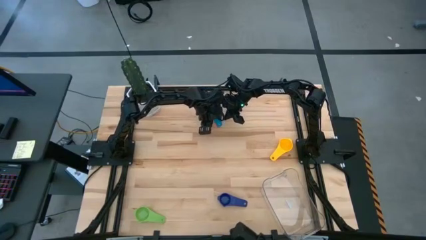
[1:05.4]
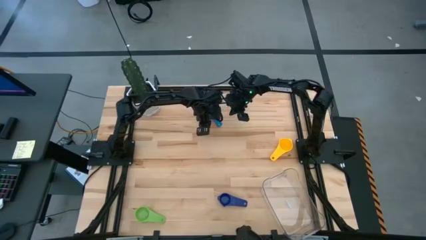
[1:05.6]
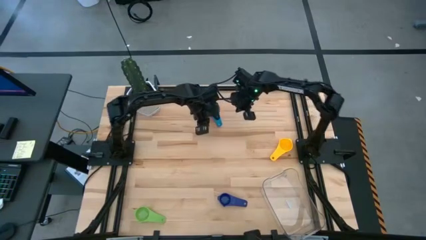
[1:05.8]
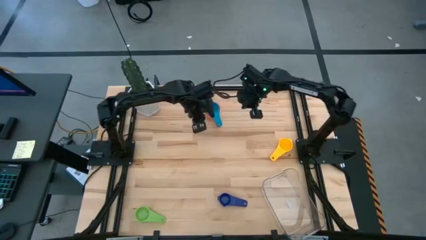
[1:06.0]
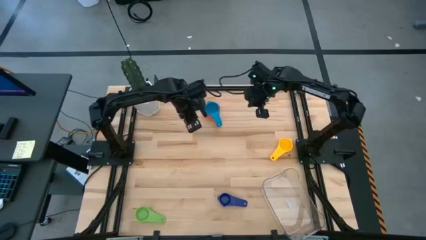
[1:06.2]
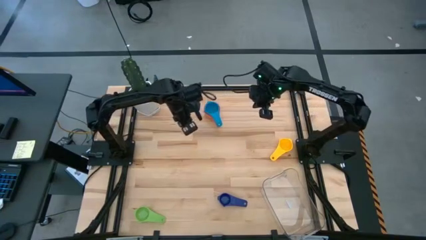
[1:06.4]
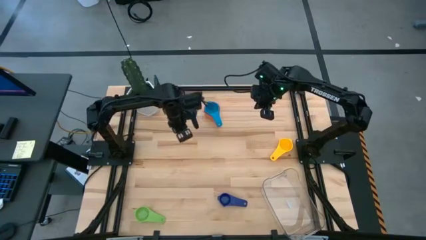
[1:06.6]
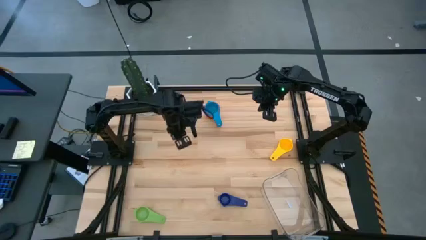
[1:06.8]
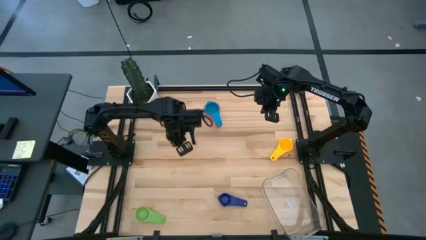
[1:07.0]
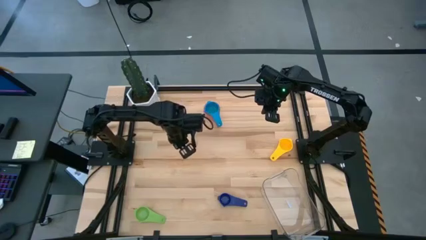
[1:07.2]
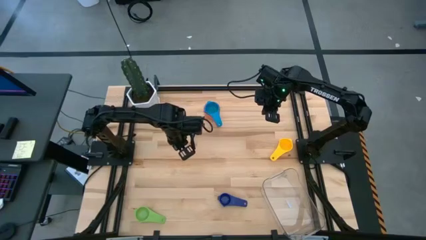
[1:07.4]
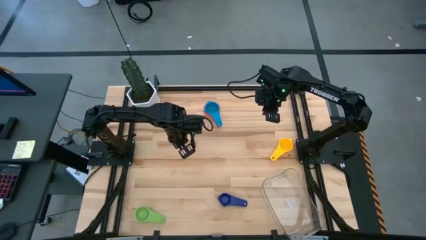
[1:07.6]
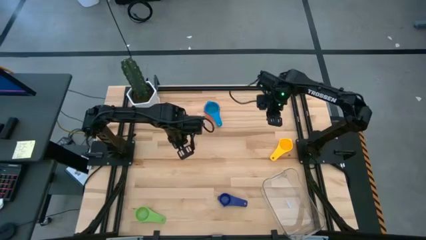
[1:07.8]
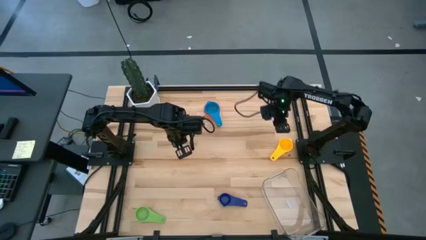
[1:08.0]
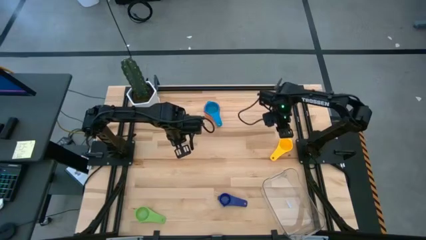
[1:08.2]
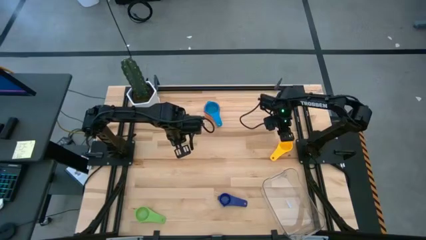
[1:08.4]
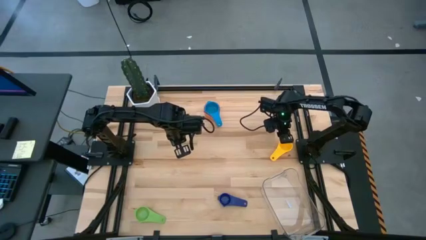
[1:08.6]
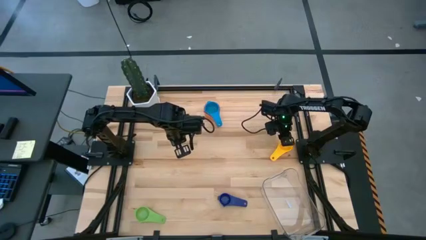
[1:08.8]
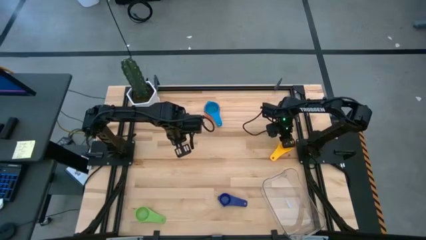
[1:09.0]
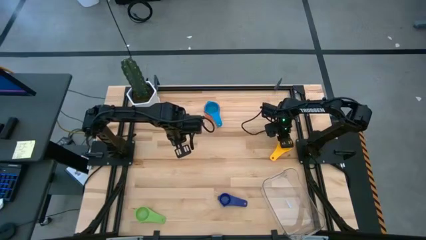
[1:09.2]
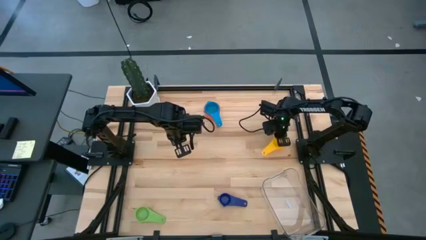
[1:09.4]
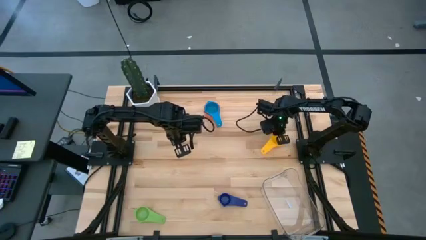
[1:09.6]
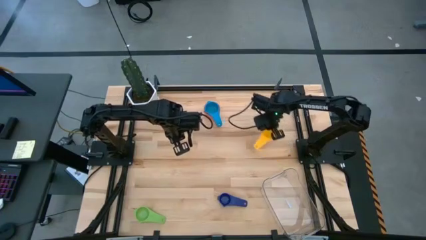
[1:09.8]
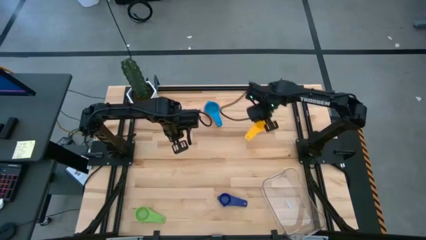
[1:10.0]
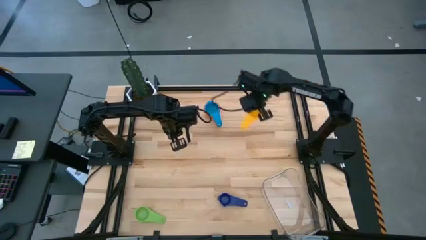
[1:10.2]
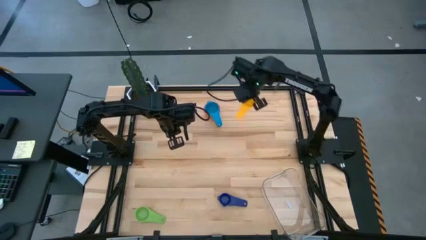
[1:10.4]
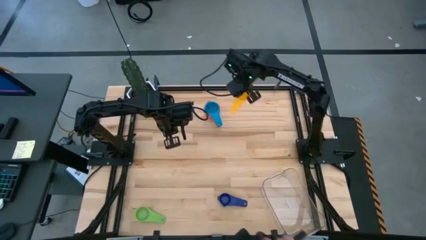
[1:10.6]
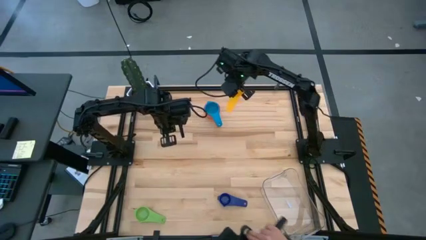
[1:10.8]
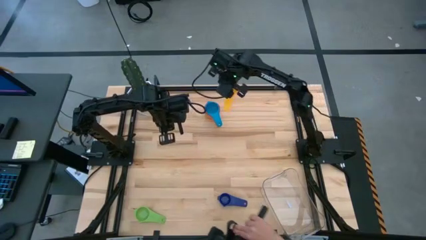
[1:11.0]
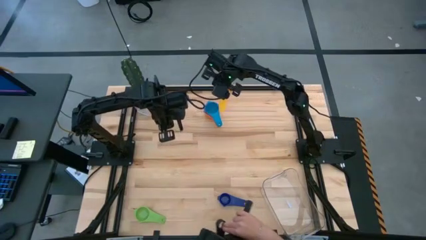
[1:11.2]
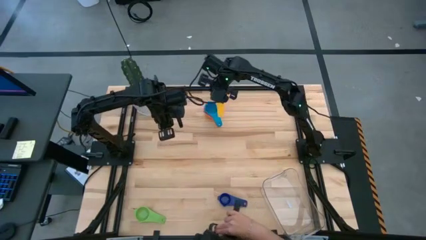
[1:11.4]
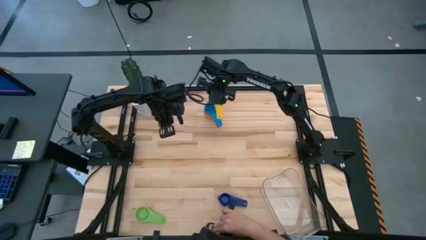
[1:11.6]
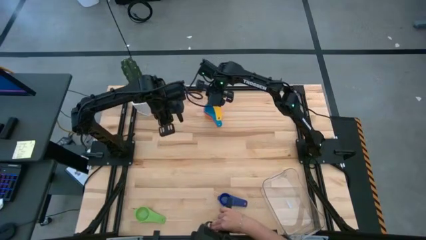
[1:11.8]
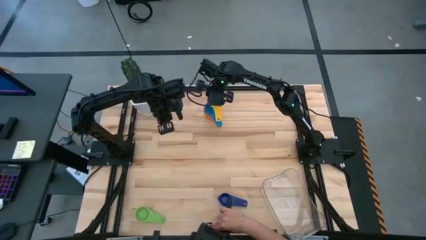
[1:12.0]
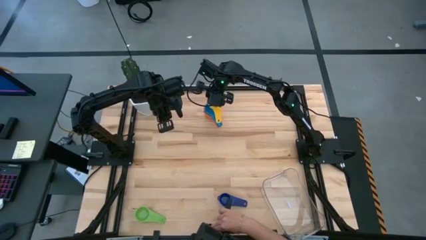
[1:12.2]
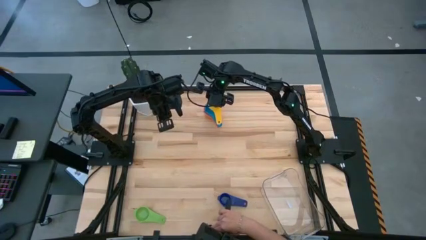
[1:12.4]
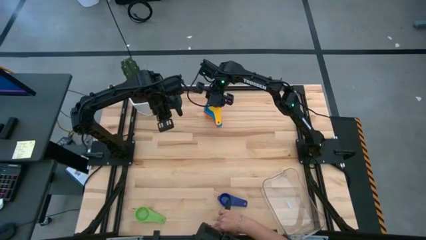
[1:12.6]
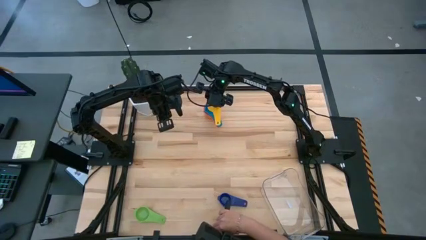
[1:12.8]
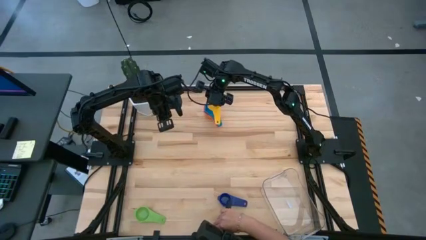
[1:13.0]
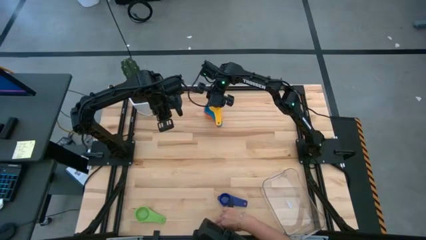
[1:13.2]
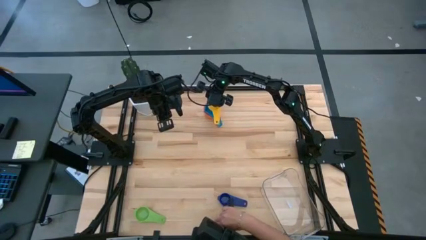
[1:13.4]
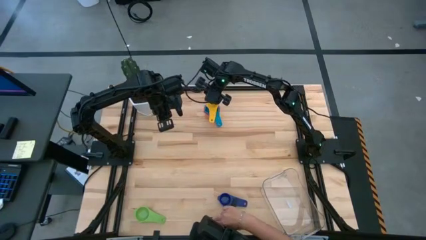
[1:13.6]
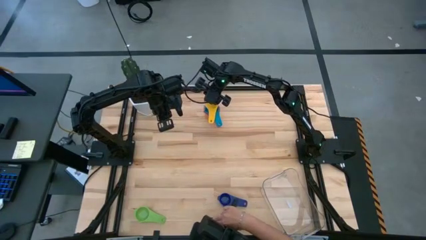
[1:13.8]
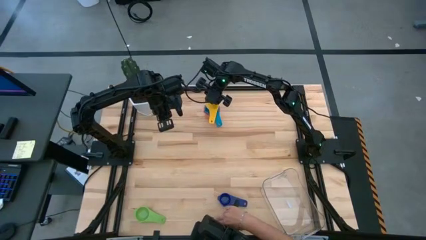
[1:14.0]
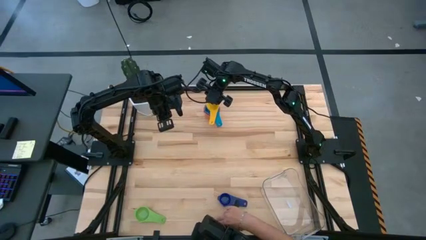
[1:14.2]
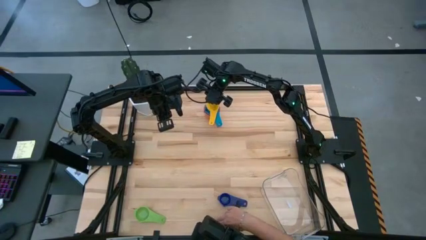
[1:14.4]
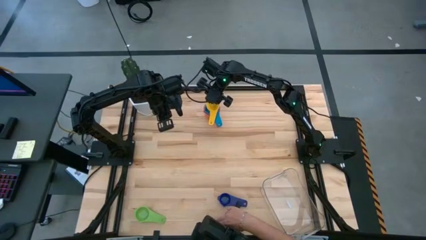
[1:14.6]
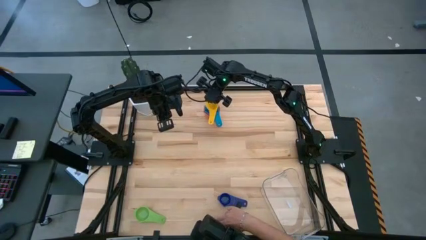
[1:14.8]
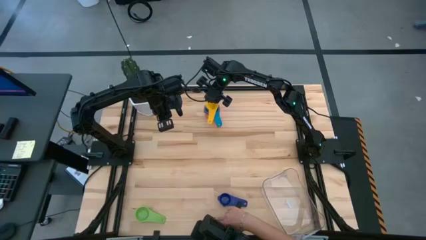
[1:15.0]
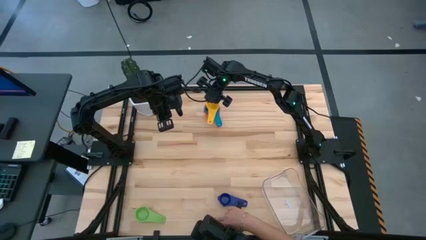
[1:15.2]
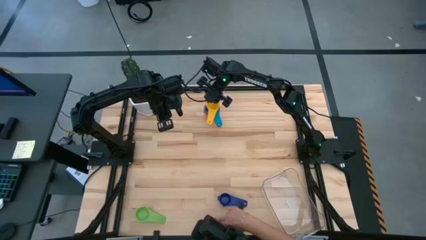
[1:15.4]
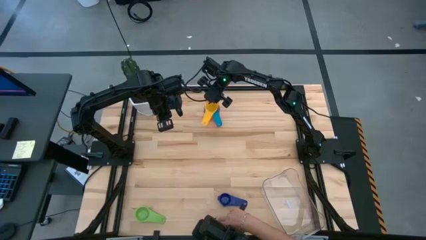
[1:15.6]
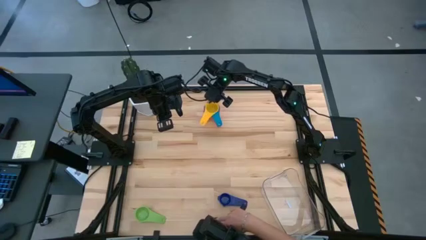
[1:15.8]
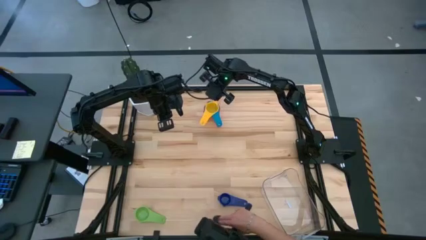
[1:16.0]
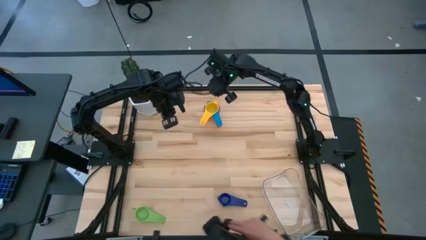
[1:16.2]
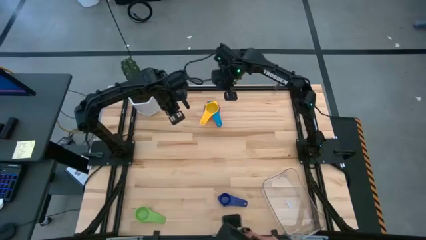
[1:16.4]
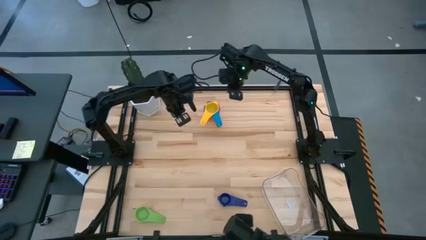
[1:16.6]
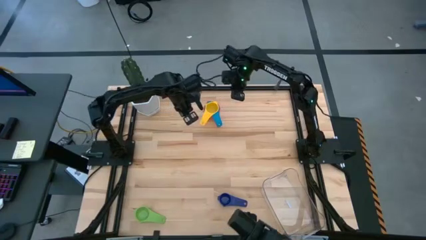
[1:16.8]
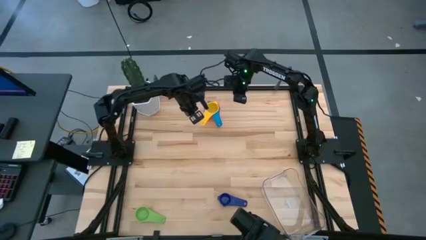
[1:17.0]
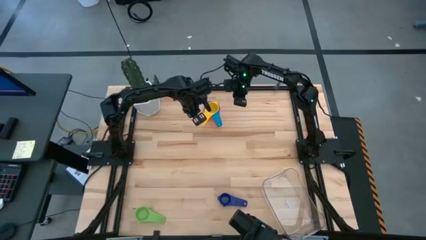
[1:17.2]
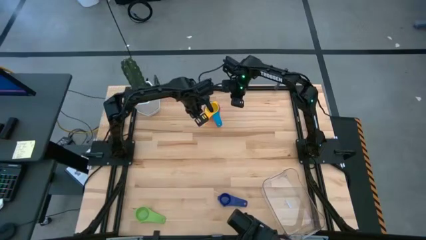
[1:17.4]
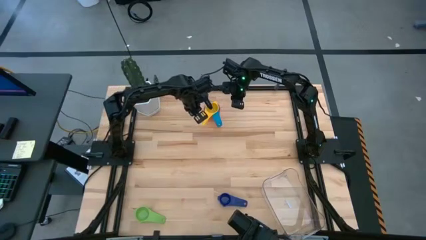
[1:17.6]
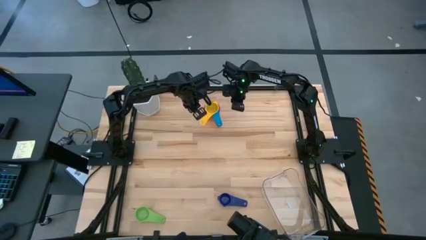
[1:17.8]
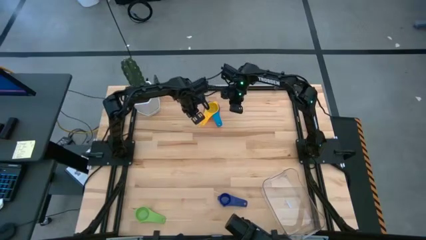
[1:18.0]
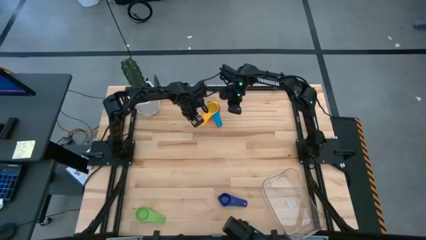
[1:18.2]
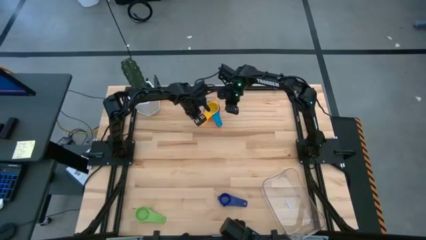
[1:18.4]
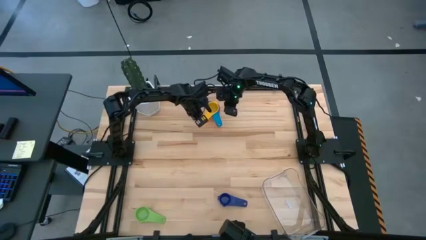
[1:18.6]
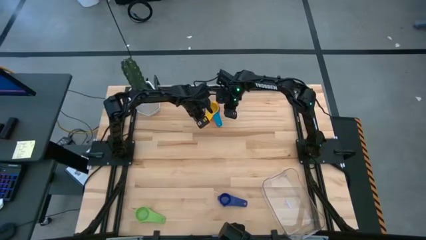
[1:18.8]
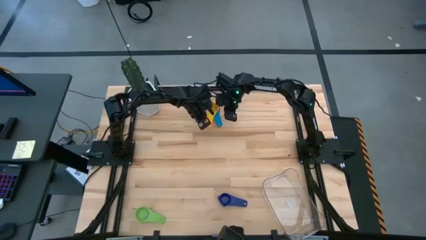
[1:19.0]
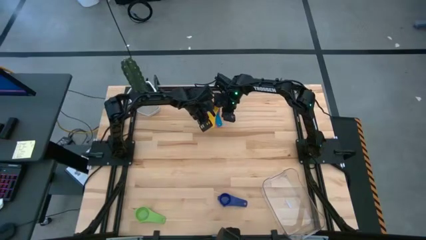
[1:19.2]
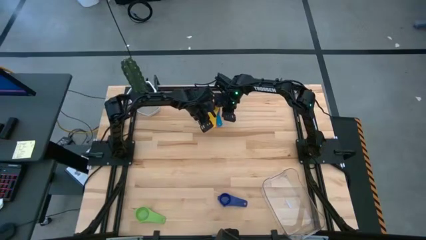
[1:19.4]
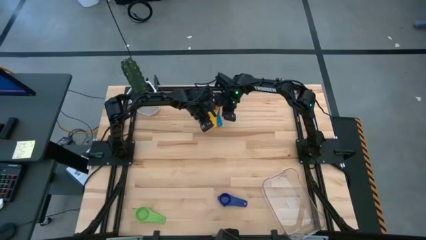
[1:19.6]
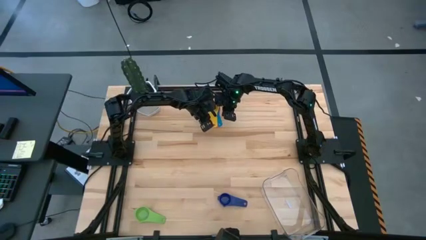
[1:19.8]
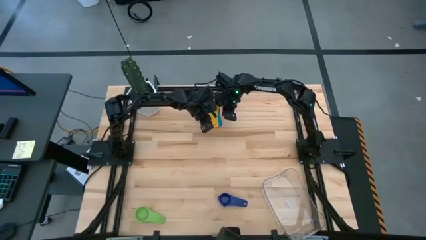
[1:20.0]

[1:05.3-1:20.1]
Task: Nest measuring cups in basket
Stack the yellow measuring cup on top of the blue measuring cup
